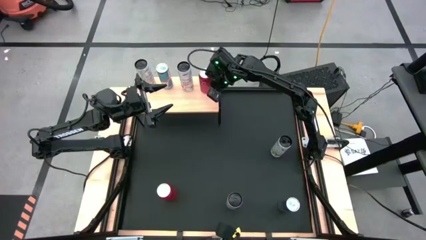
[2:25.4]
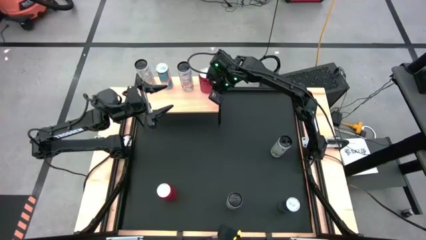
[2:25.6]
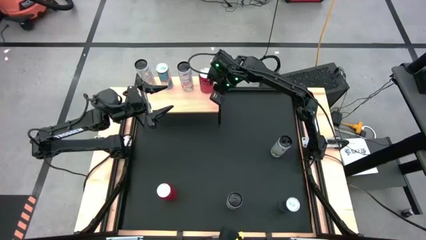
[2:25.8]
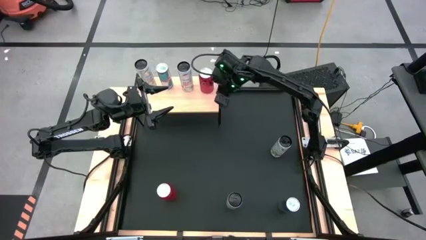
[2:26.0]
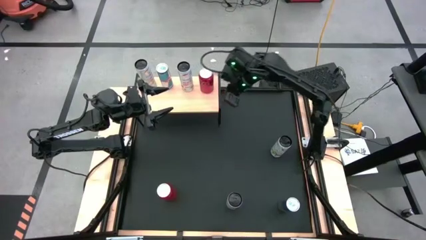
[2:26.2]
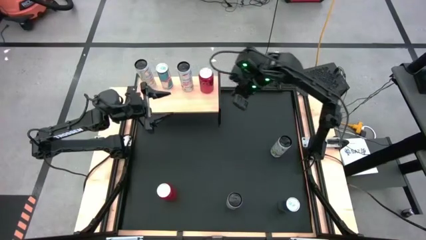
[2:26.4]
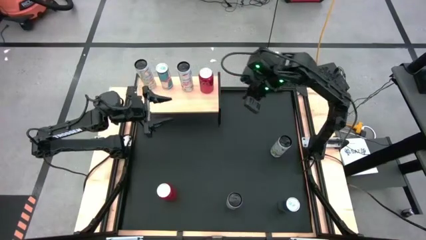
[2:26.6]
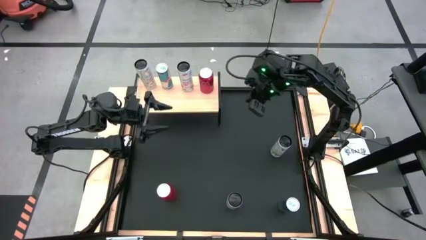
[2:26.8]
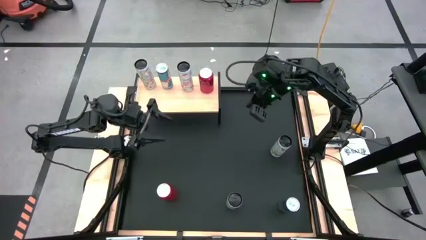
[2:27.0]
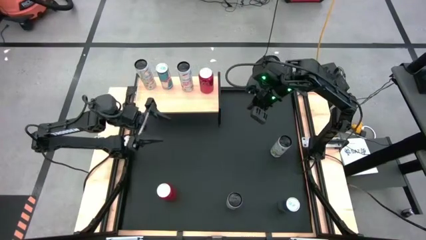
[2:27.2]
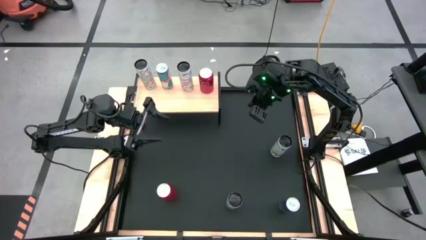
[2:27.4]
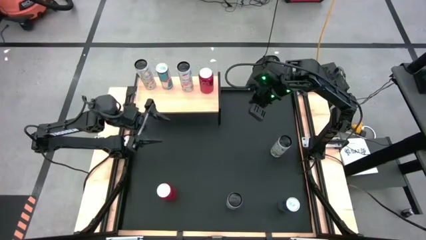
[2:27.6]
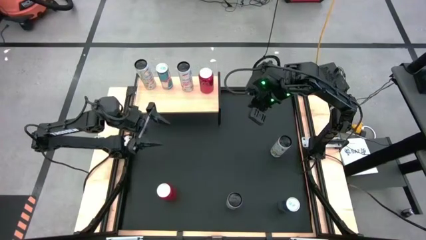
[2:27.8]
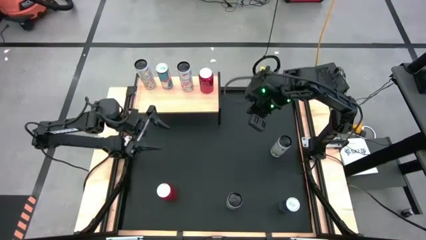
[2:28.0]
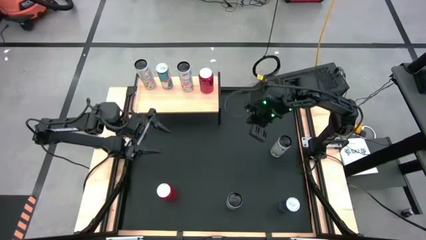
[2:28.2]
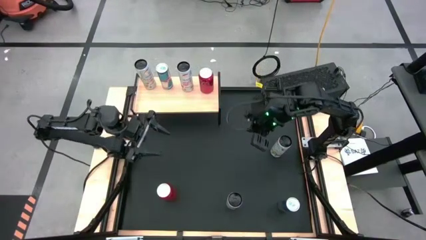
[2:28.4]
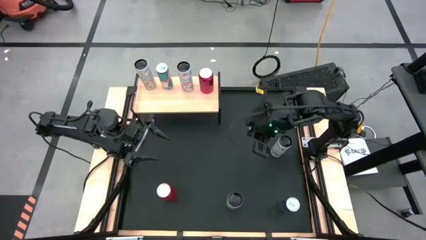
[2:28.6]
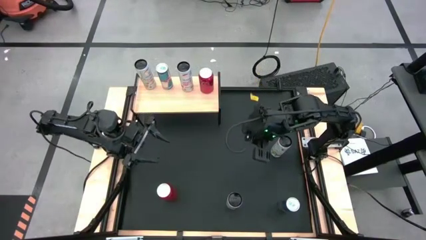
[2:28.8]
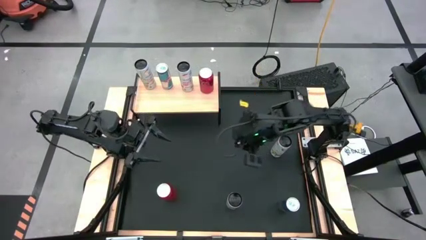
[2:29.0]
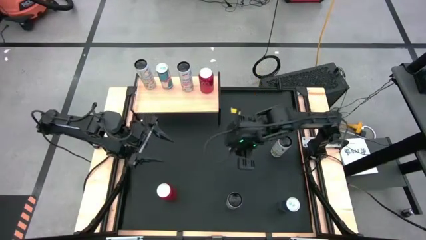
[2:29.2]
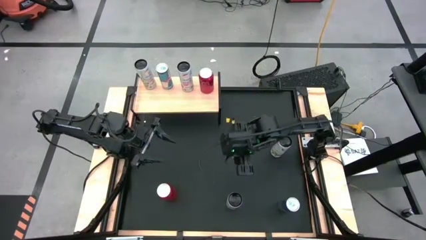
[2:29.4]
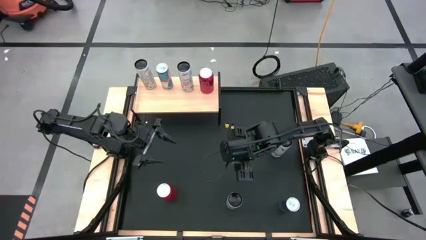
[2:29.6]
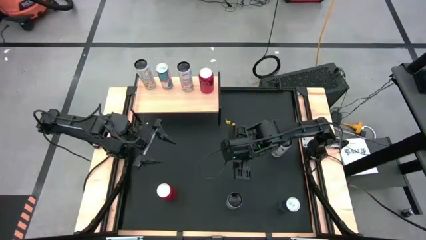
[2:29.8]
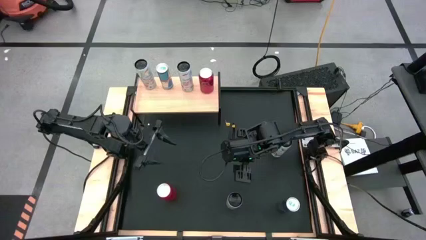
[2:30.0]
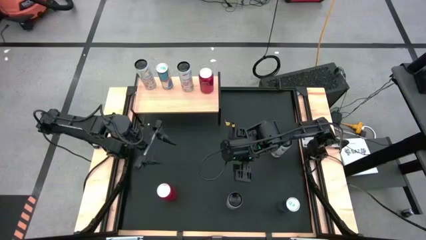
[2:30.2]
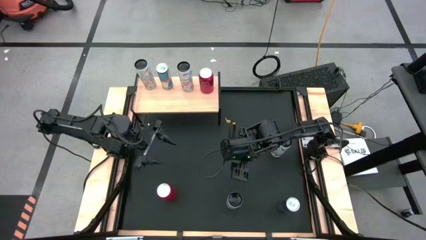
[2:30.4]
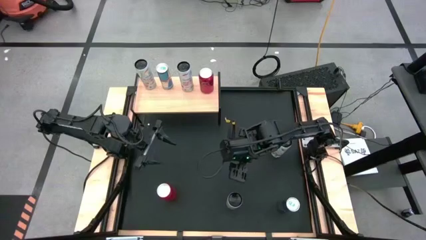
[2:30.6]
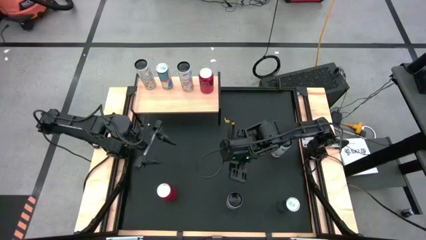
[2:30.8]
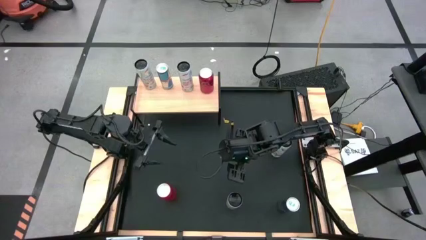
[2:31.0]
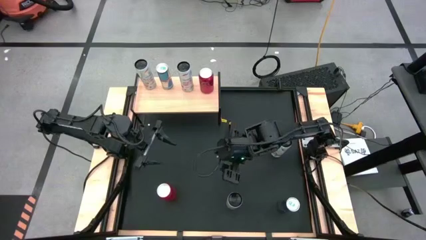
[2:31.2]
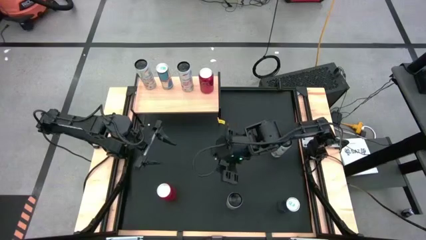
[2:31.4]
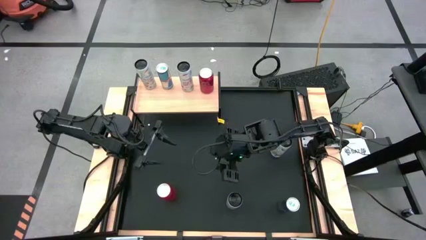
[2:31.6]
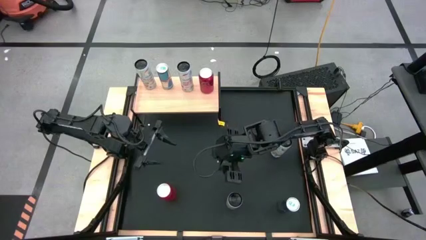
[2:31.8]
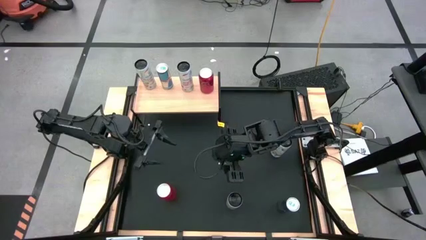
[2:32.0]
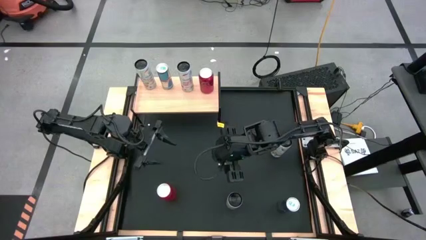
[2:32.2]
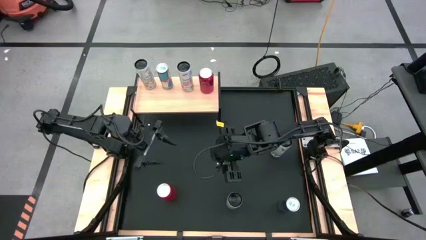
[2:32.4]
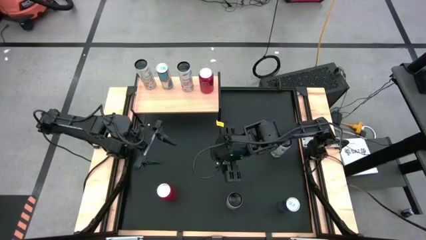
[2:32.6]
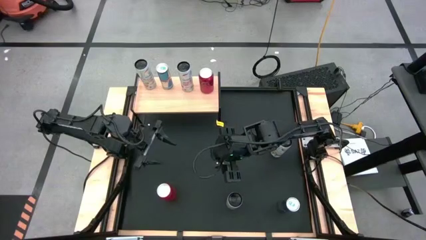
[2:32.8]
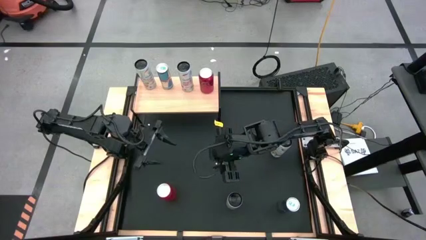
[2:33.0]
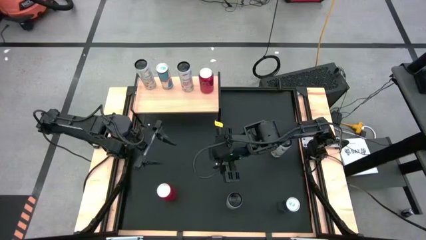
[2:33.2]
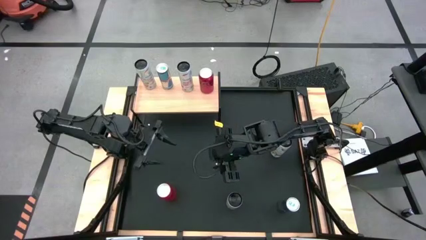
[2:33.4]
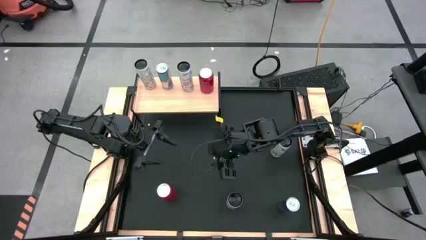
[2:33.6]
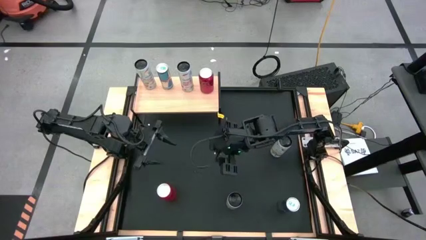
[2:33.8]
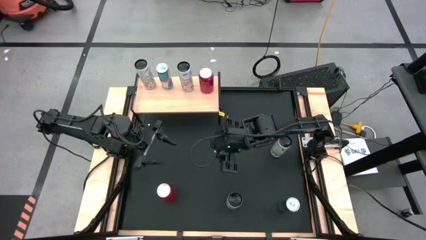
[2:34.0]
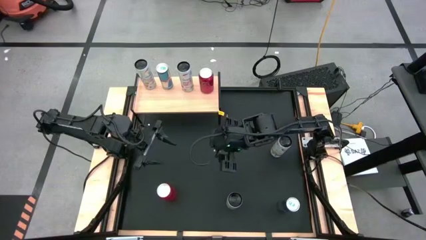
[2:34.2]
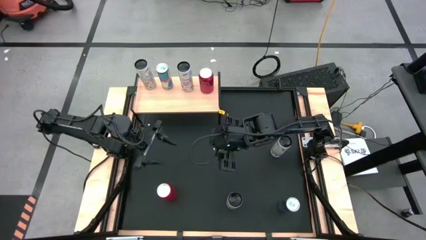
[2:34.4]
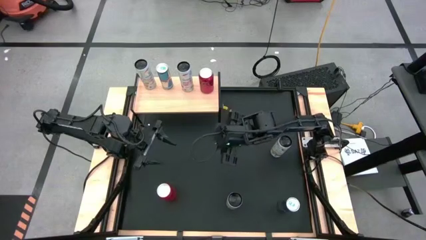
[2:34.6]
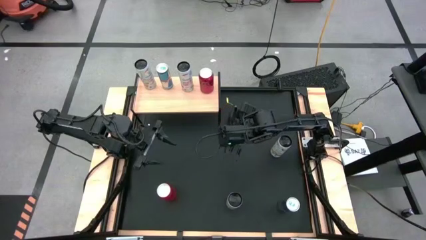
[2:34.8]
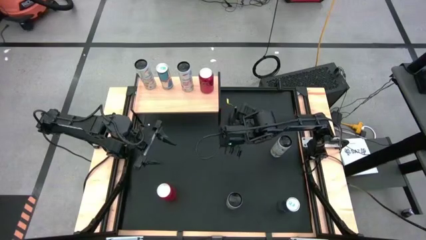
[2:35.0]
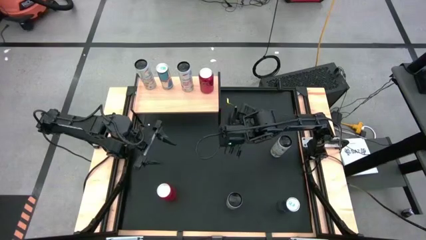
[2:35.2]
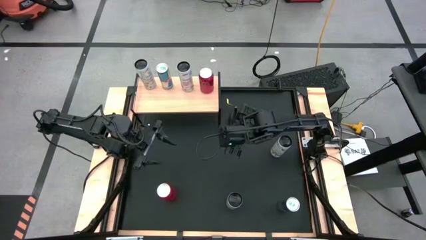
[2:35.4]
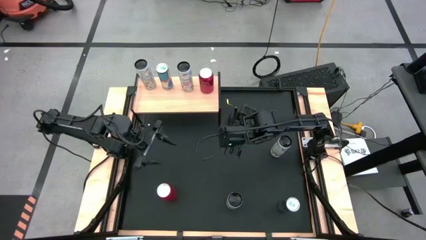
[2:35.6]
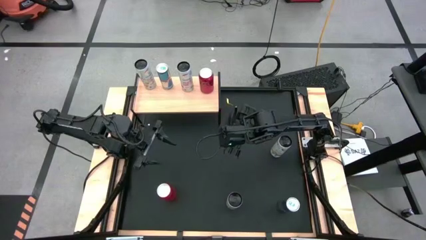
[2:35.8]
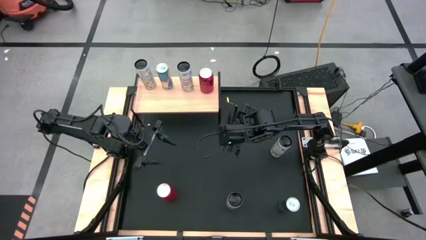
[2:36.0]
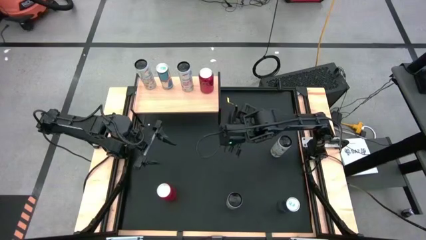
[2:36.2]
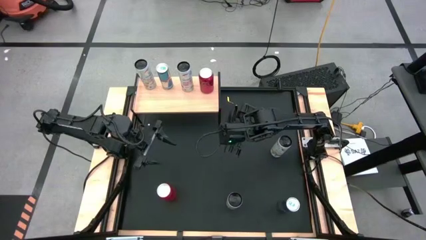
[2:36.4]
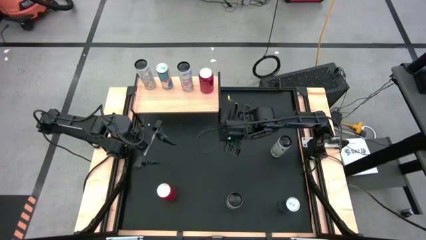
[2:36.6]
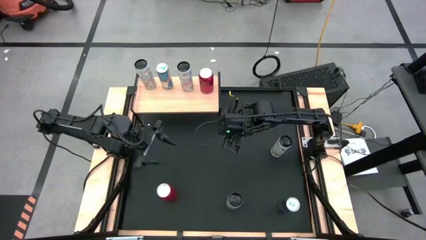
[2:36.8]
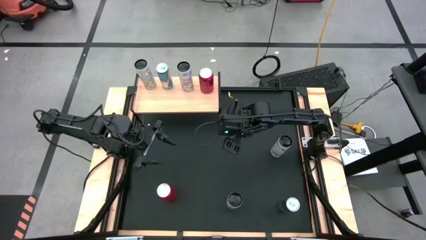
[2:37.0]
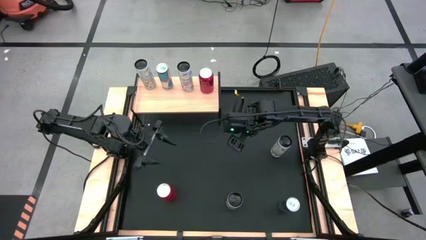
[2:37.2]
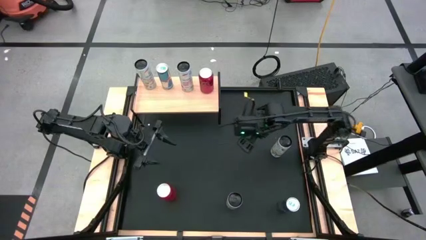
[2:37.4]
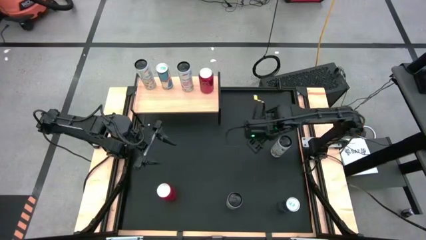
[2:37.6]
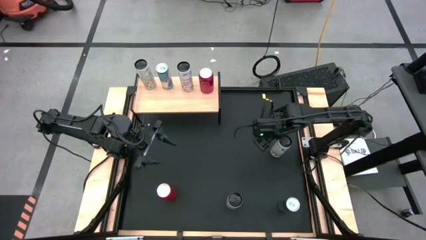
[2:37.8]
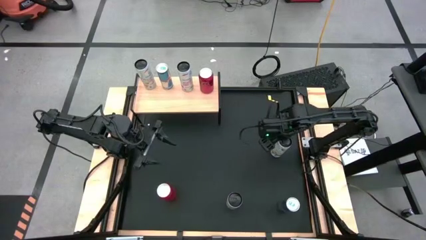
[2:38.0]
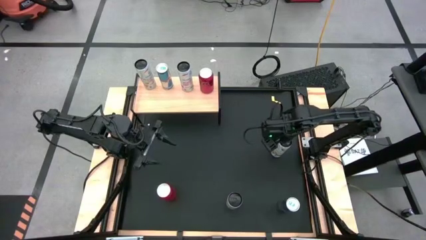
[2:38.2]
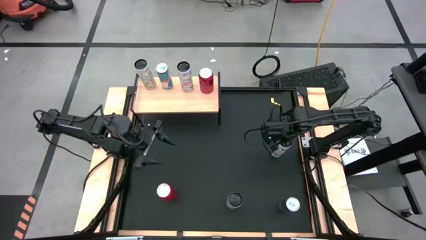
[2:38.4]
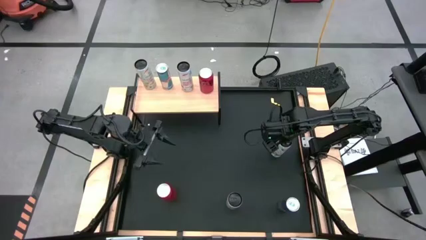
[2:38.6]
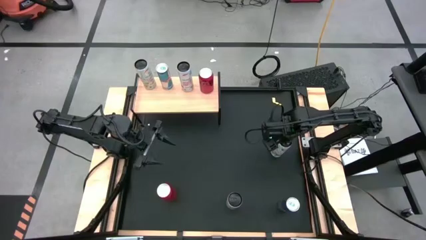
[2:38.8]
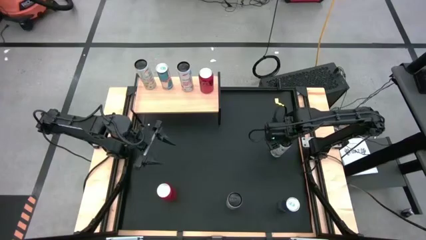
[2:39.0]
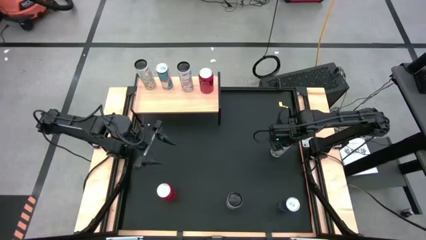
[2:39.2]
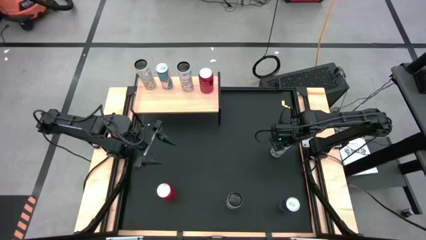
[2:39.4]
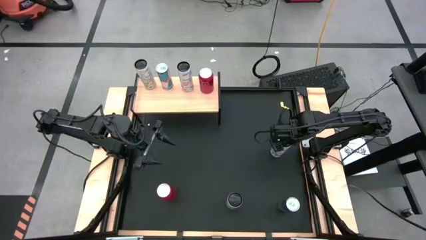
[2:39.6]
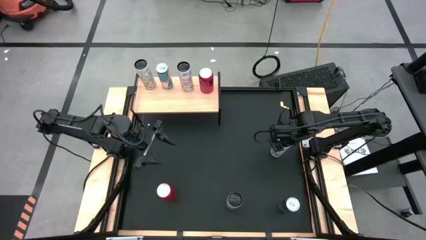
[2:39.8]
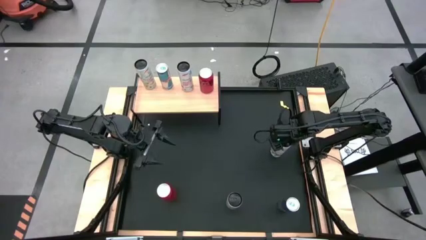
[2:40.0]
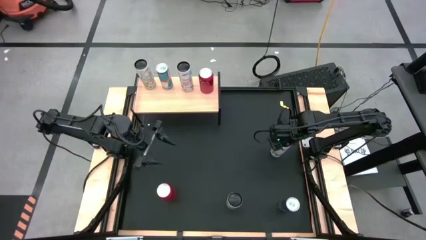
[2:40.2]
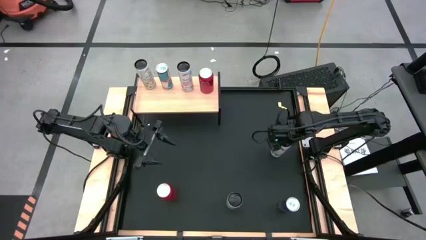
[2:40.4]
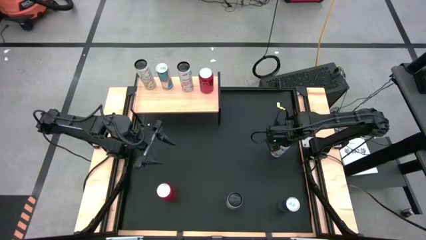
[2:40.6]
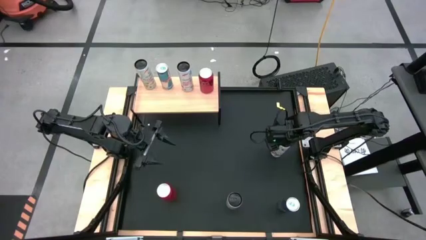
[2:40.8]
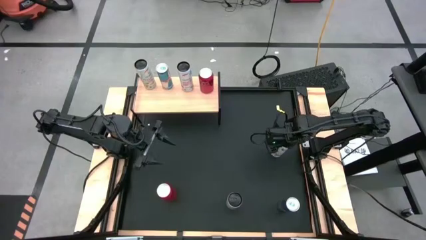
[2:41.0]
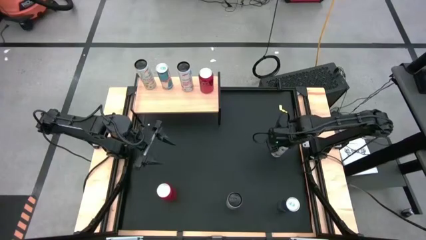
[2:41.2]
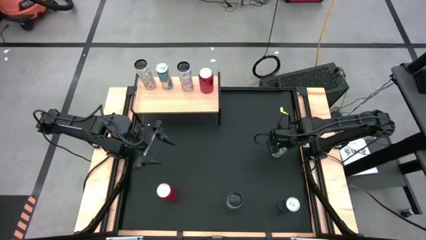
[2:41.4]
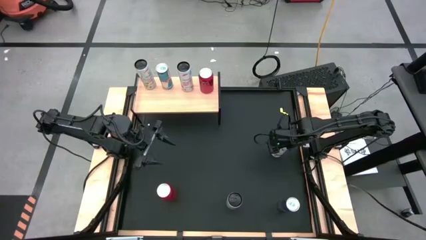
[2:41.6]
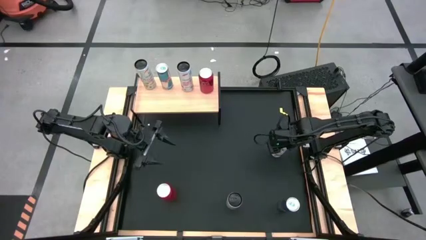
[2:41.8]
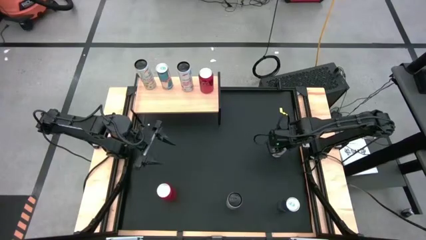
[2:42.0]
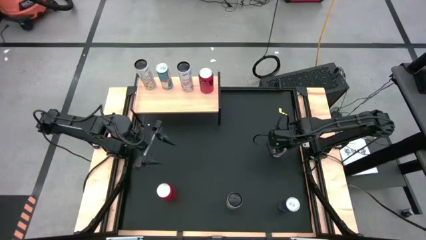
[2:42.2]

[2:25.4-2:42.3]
Task: Place canned beverage on shelf
Put the white yellow soda can on the shelf aligned with the white yellow soda can
